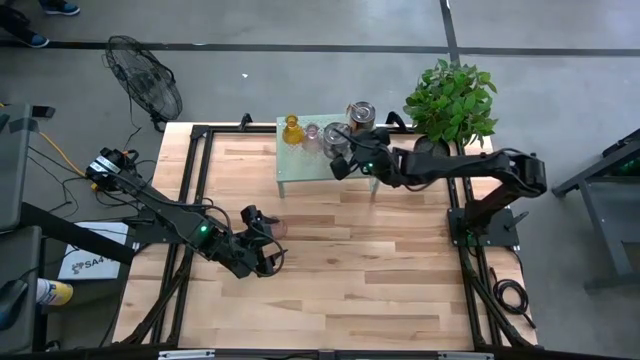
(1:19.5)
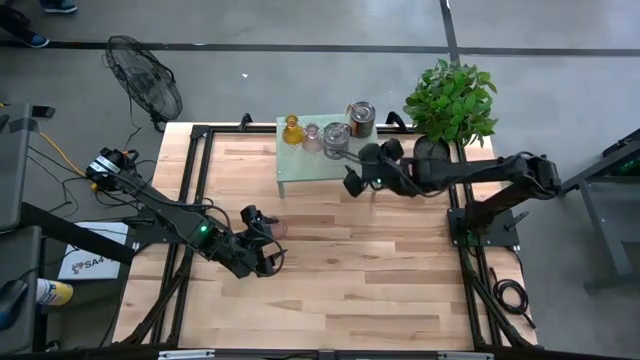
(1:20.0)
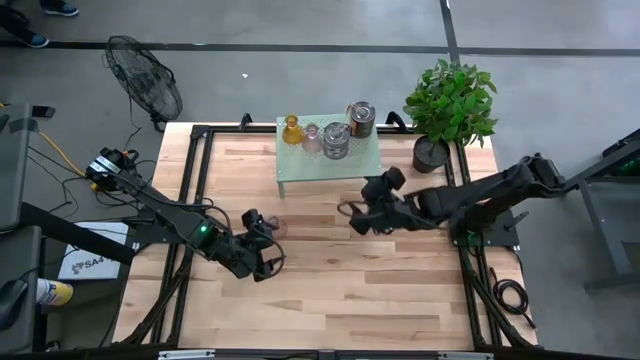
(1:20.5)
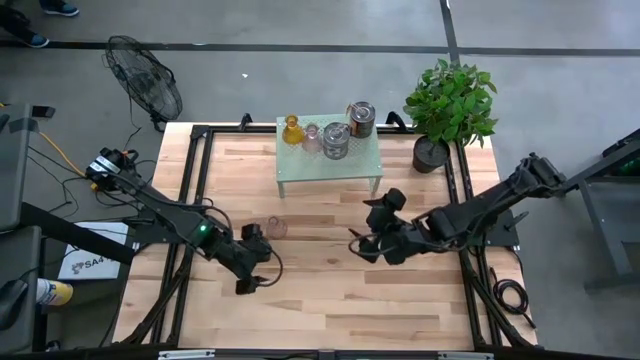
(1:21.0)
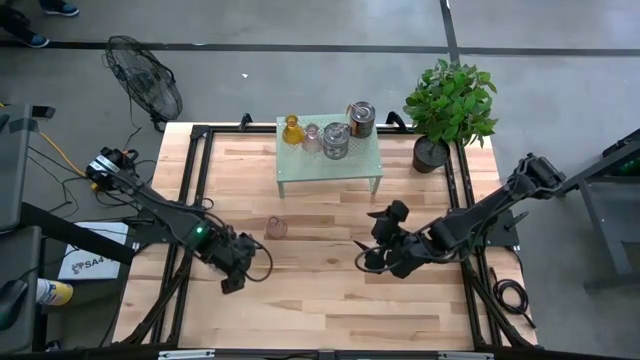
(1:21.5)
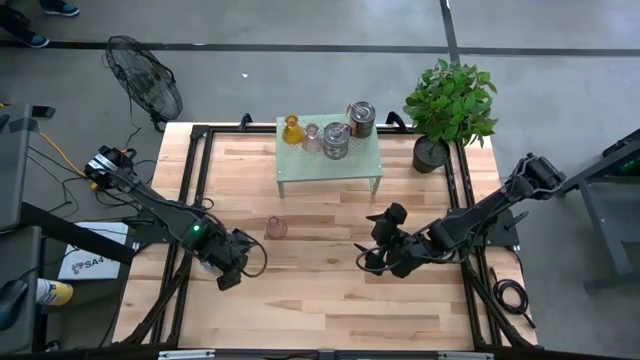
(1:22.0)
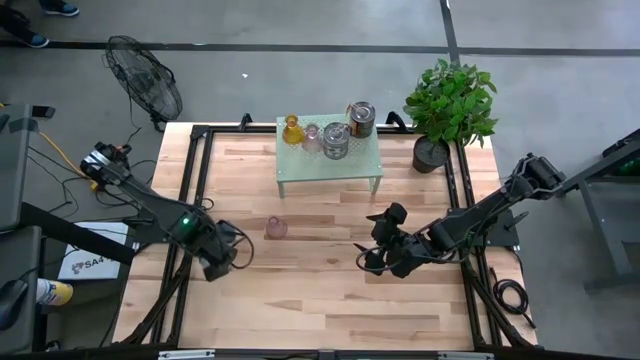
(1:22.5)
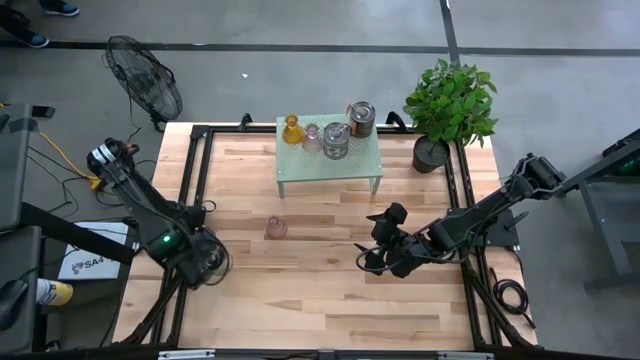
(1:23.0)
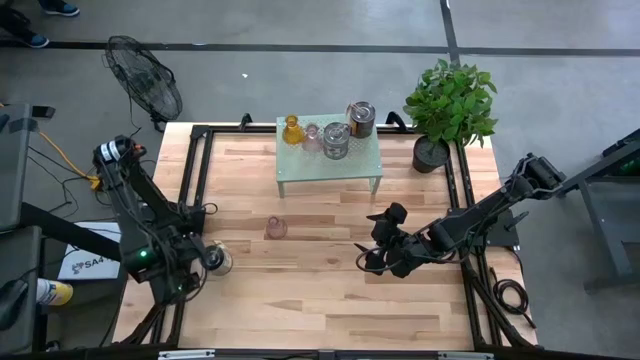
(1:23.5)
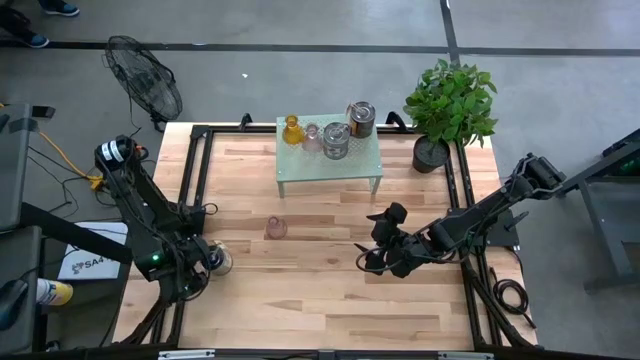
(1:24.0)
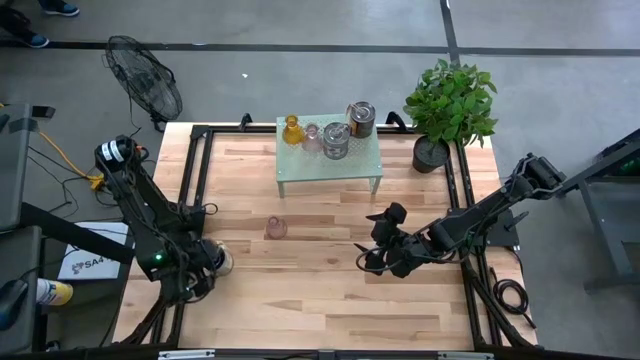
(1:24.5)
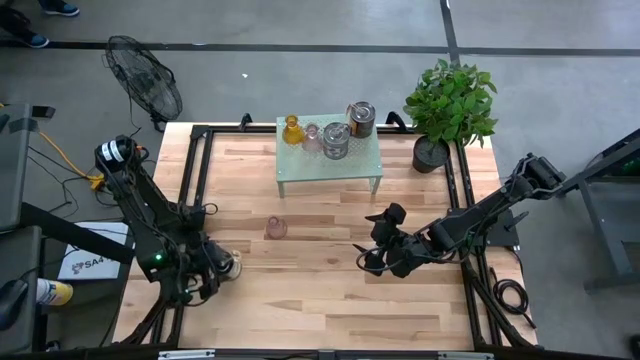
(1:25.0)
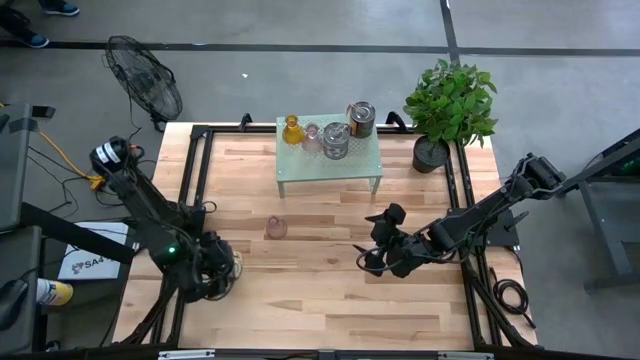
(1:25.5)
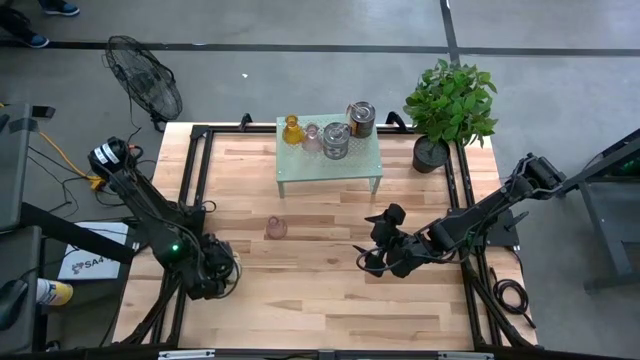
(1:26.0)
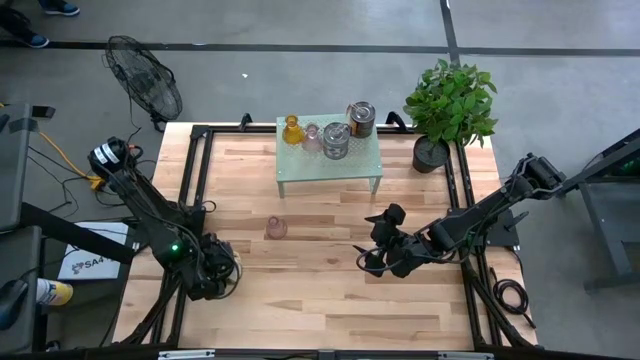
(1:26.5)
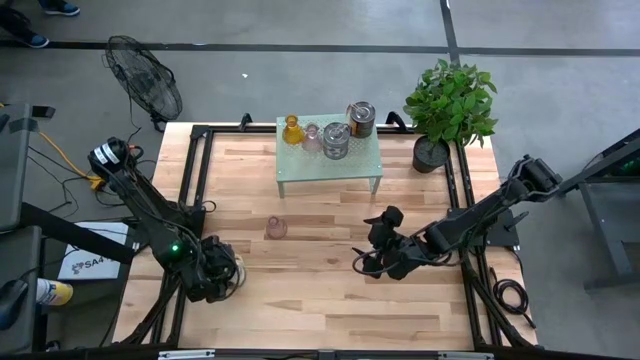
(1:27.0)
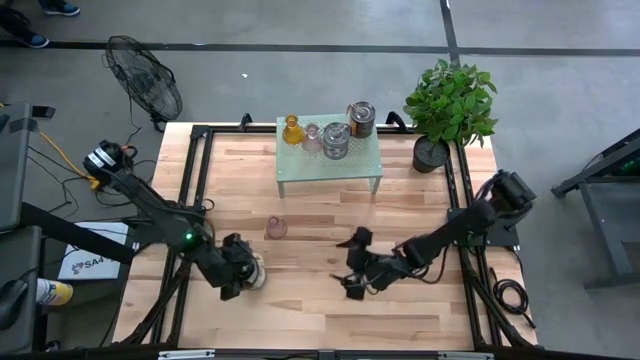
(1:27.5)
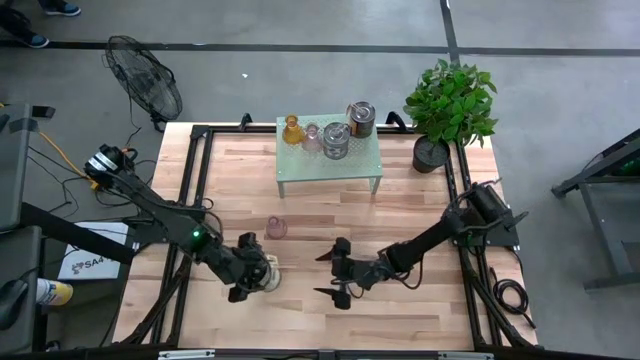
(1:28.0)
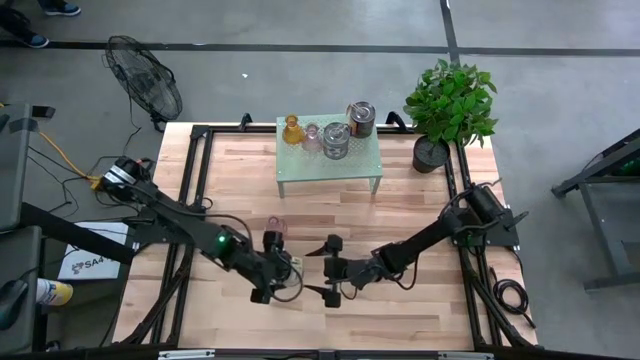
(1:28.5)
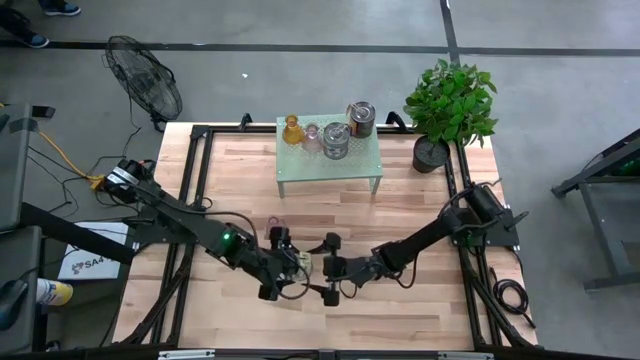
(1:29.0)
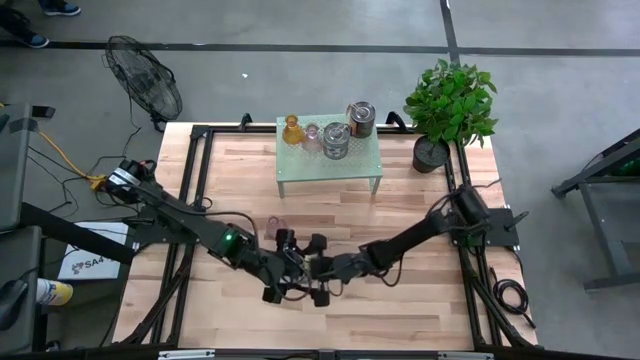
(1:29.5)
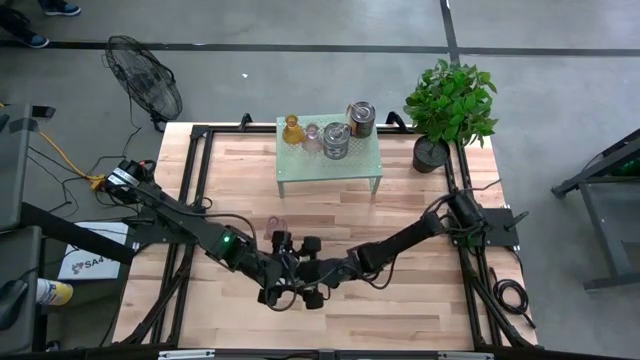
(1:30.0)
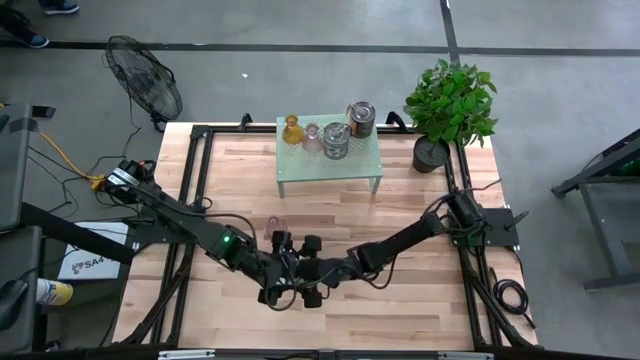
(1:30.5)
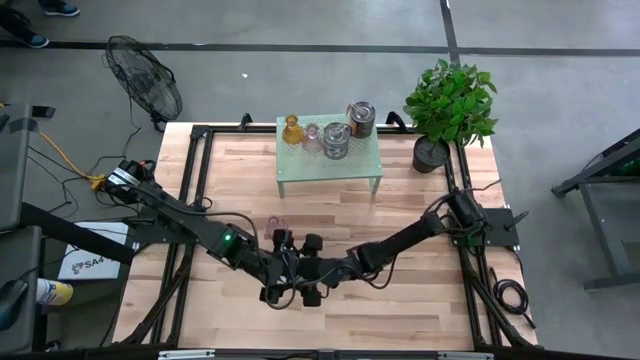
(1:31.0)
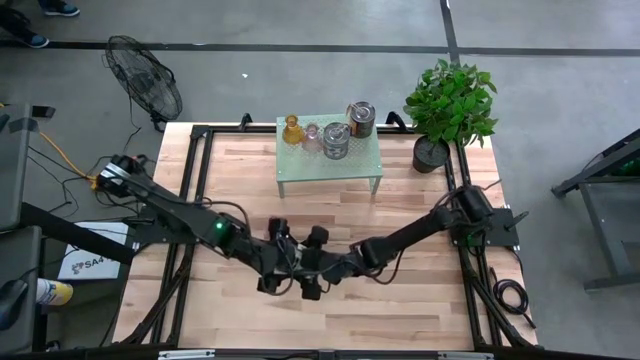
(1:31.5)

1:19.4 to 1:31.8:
Task: Pick & Place candle stick holders
Put the silver candle on the shelf

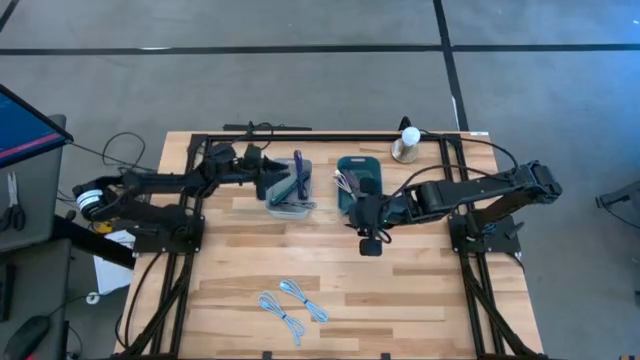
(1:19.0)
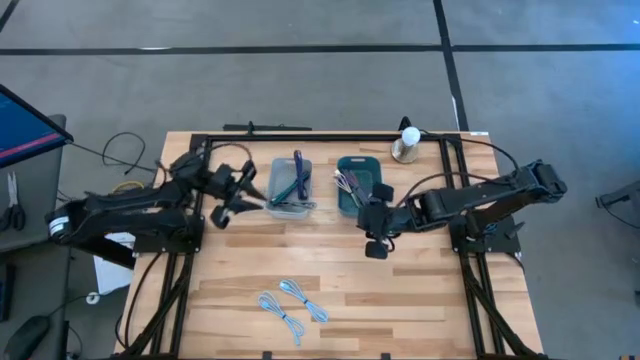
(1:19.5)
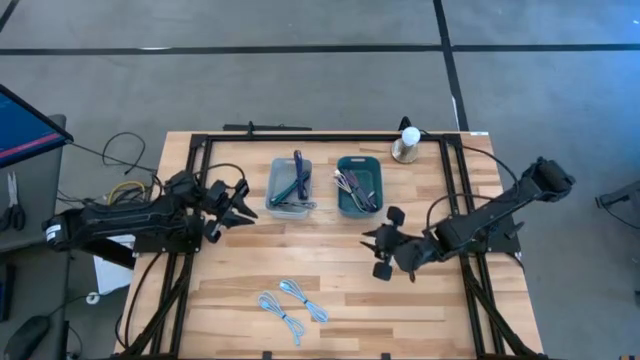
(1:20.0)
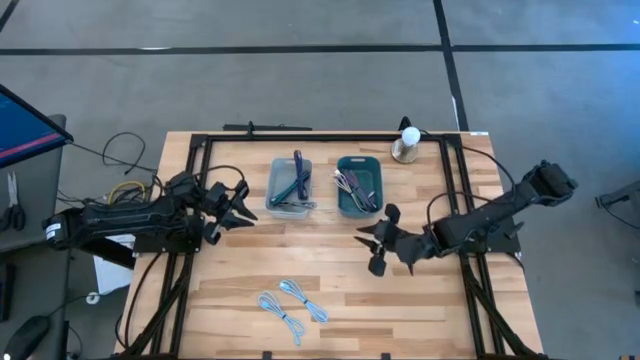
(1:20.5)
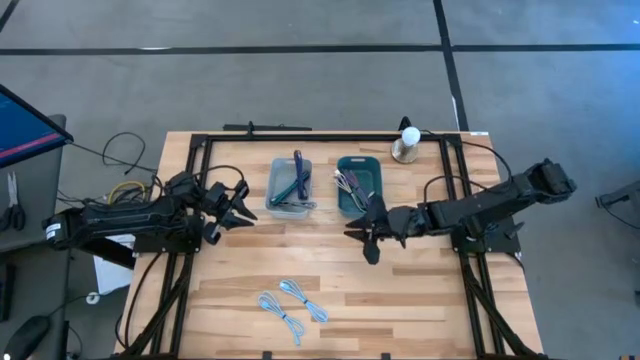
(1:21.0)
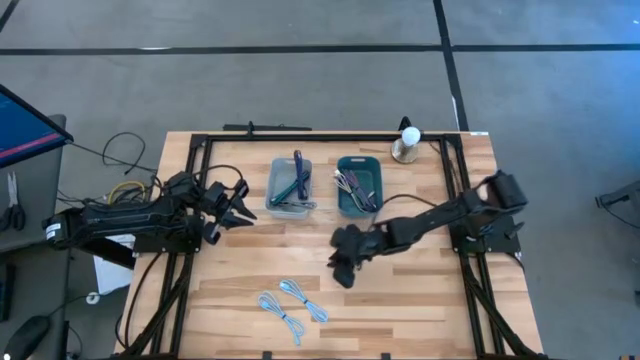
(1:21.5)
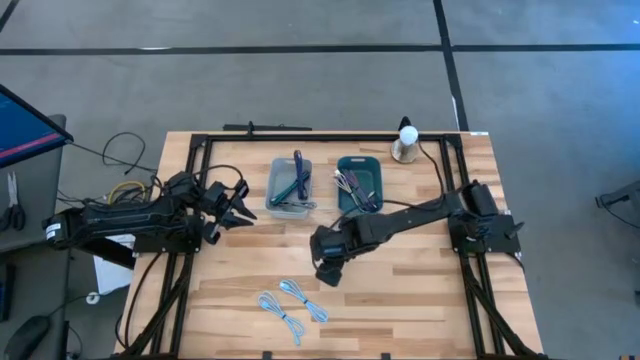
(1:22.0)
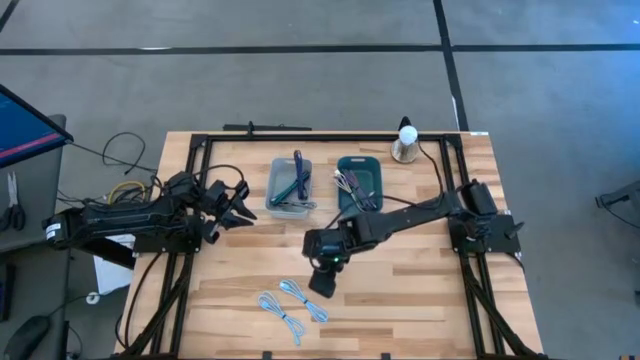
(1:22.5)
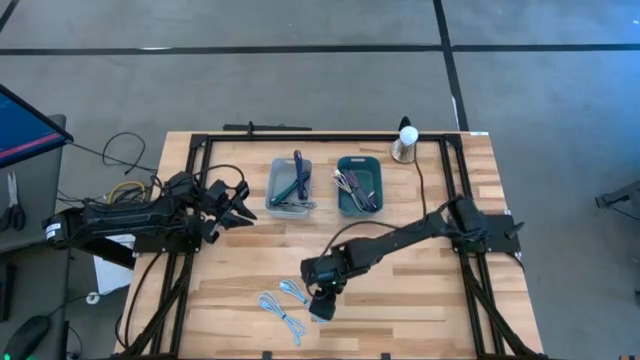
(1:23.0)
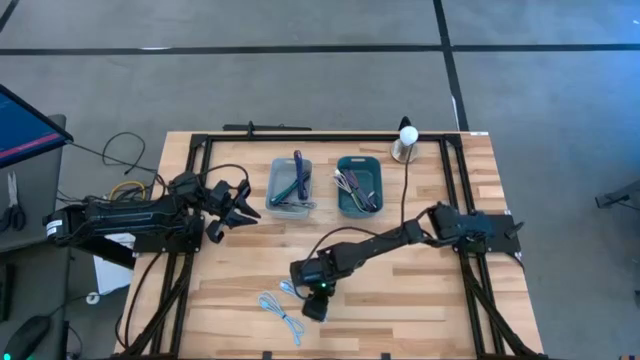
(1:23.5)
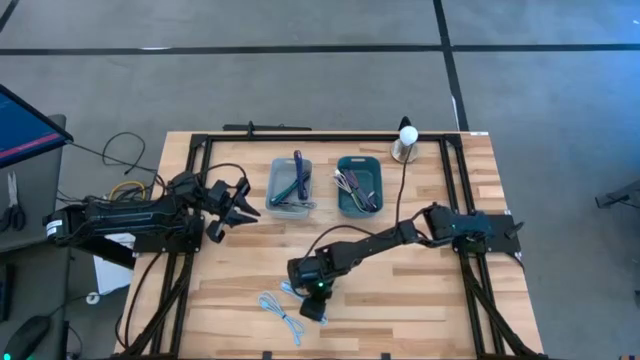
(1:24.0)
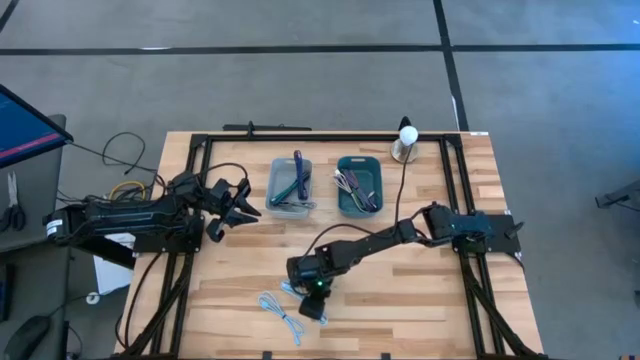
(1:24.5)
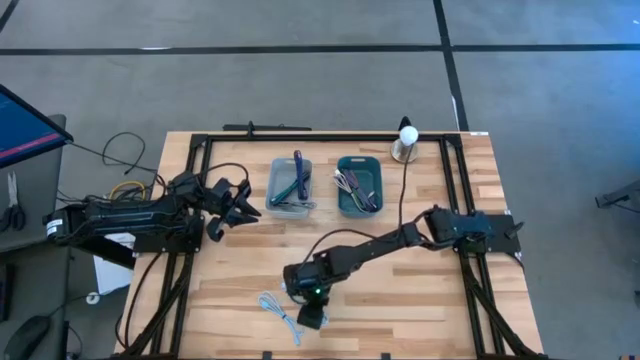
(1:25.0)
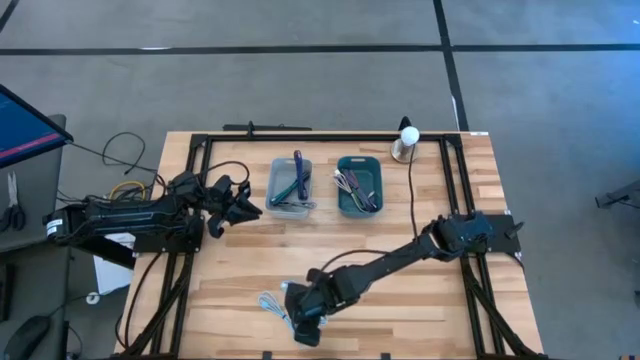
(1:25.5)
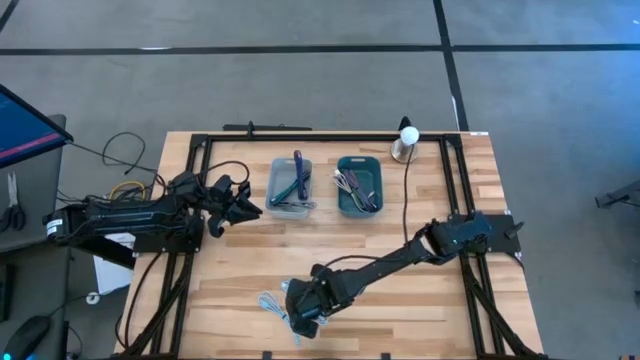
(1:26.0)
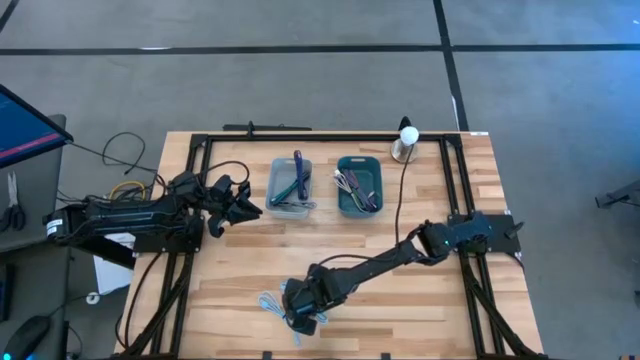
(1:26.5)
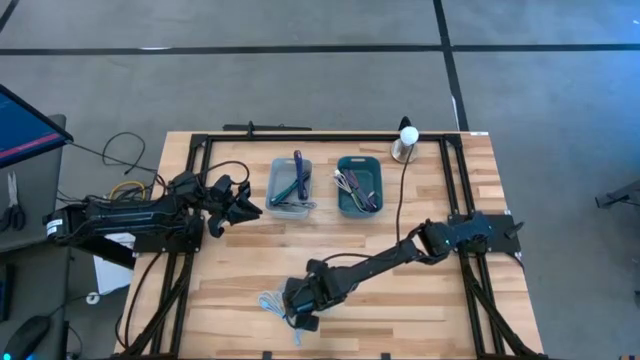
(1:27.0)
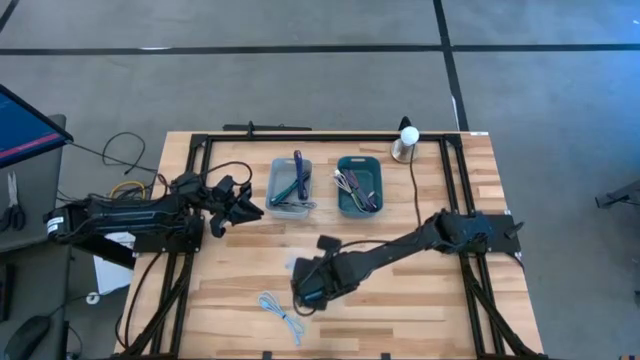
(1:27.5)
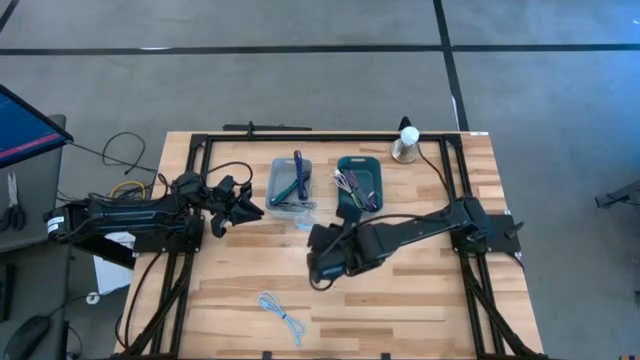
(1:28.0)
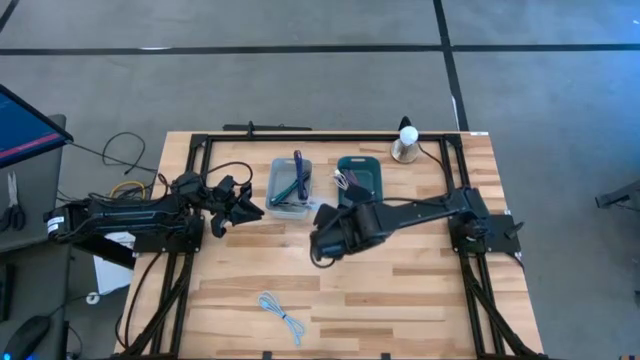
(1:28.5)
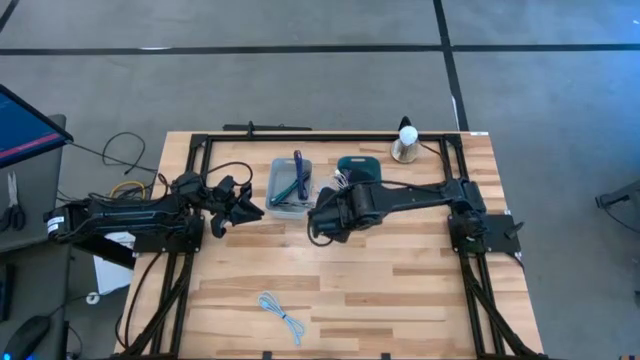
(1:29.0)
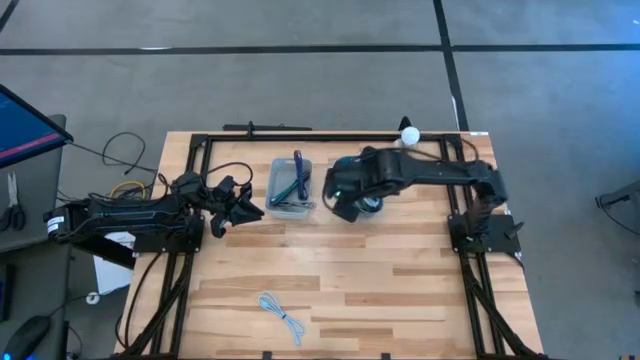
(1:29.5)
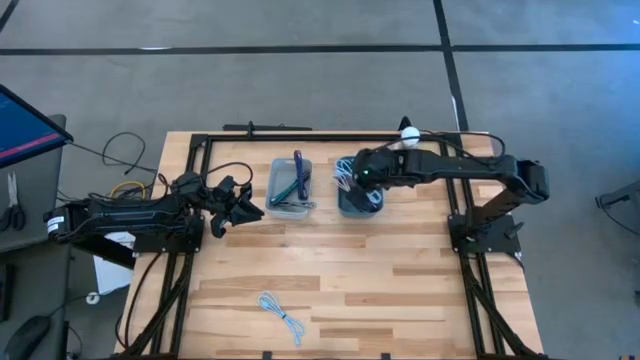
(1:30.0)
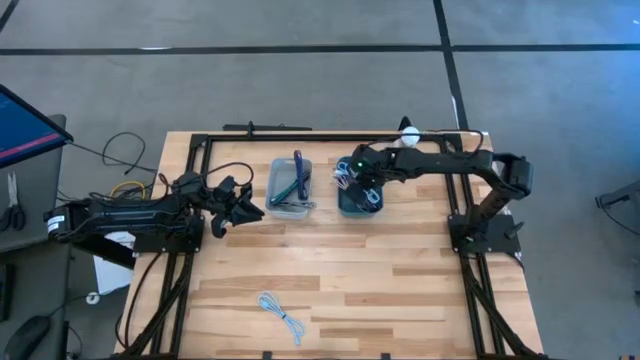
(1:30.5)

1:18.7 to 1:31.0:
Task: Pick & Place USB Port
Put the right white charger cable into the blue bin
